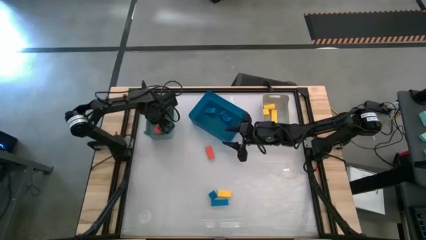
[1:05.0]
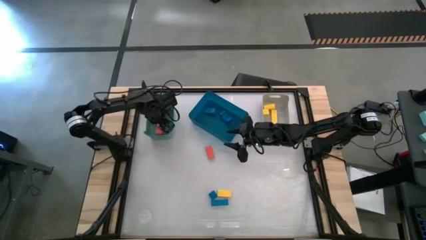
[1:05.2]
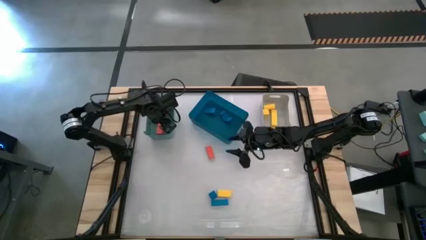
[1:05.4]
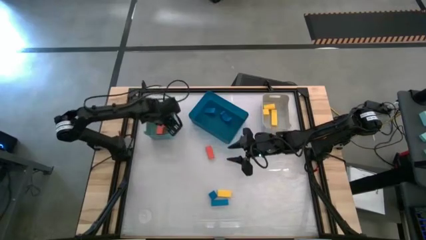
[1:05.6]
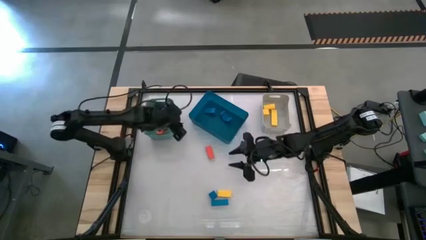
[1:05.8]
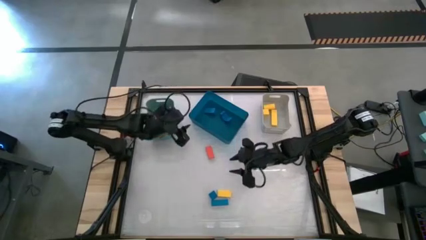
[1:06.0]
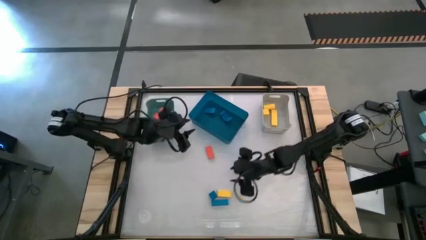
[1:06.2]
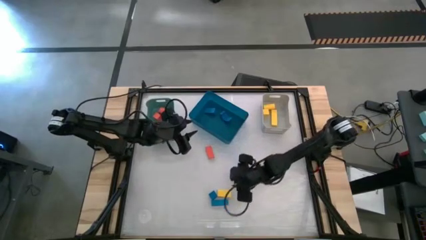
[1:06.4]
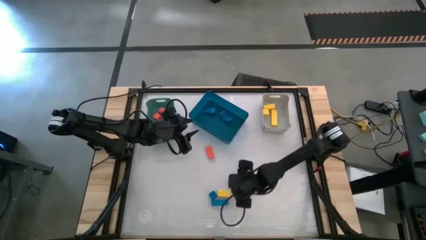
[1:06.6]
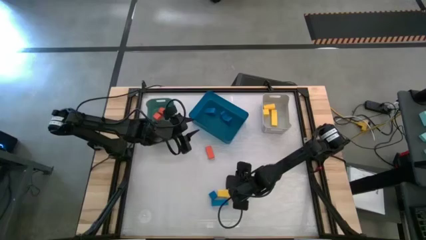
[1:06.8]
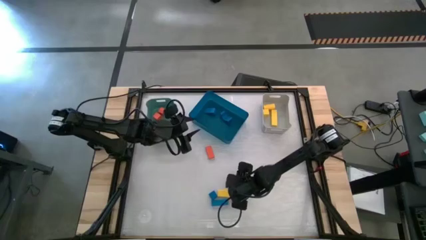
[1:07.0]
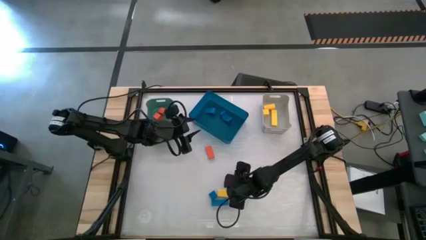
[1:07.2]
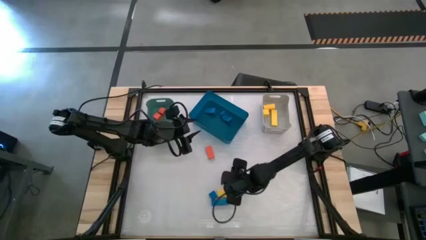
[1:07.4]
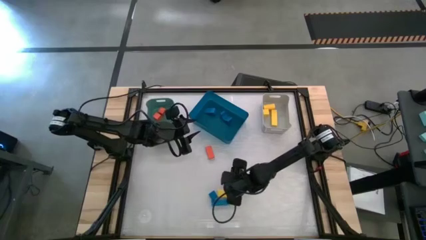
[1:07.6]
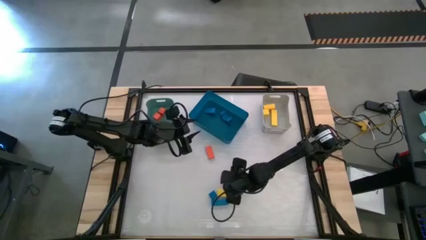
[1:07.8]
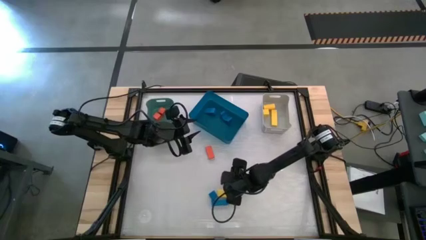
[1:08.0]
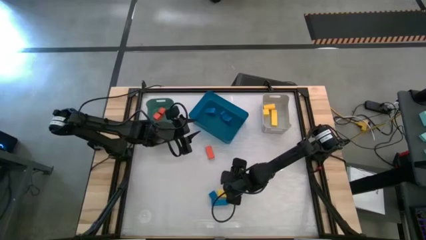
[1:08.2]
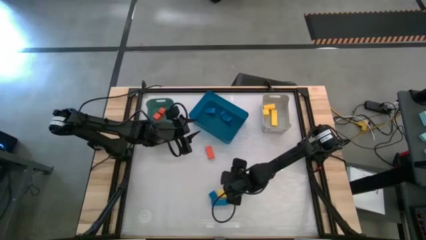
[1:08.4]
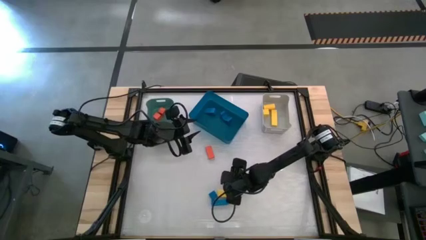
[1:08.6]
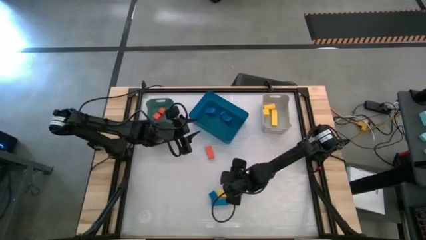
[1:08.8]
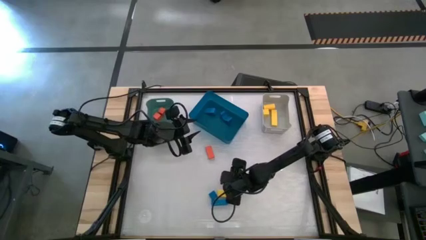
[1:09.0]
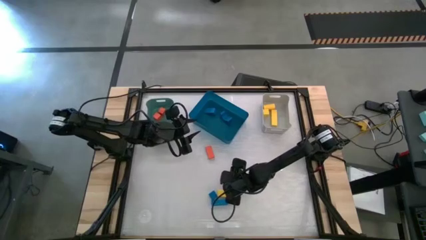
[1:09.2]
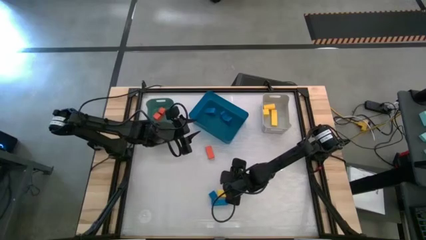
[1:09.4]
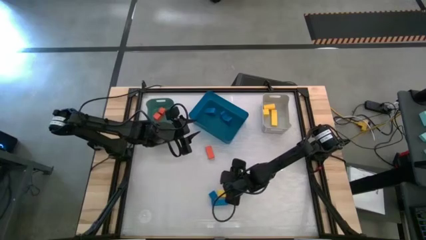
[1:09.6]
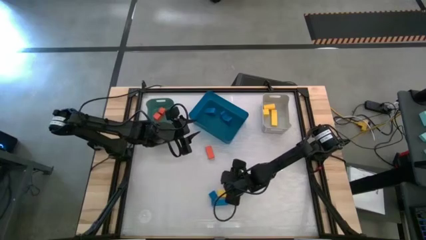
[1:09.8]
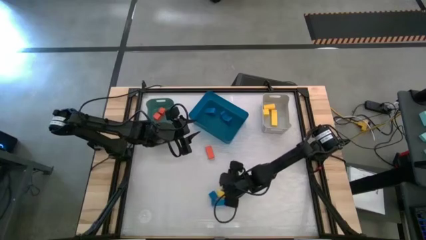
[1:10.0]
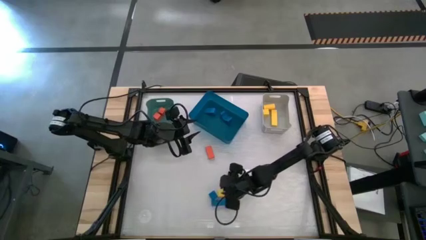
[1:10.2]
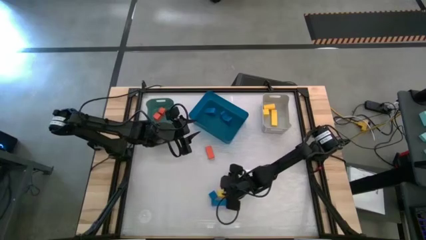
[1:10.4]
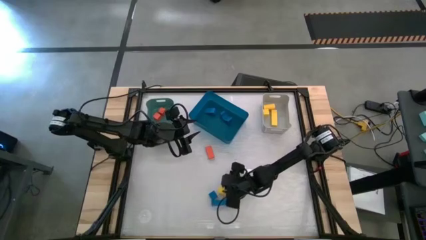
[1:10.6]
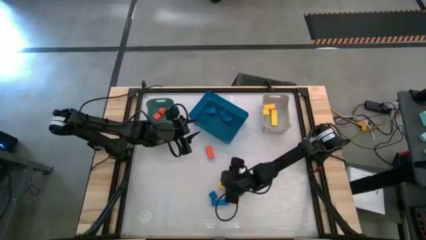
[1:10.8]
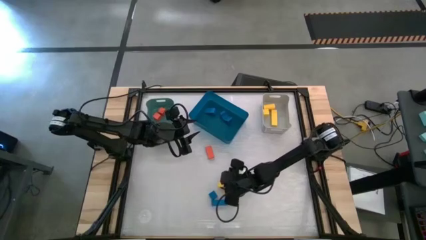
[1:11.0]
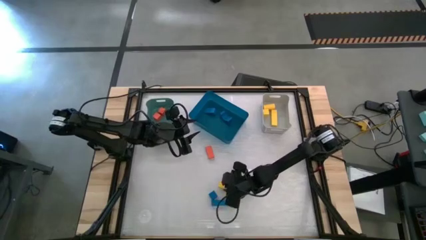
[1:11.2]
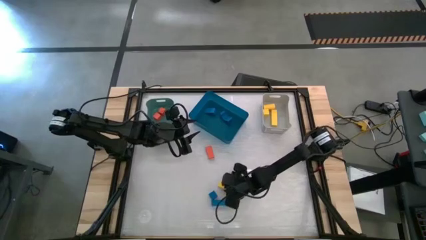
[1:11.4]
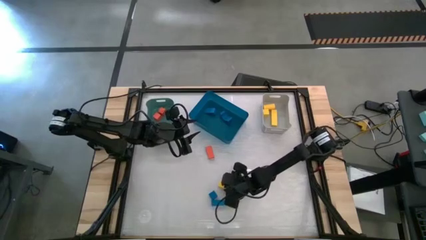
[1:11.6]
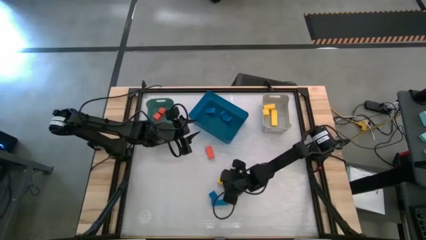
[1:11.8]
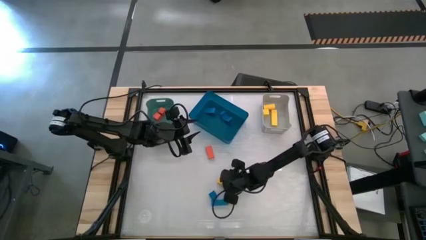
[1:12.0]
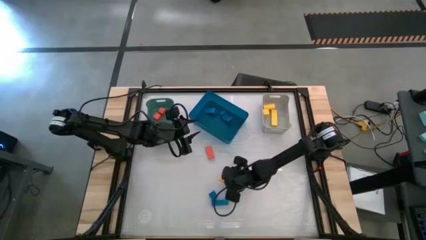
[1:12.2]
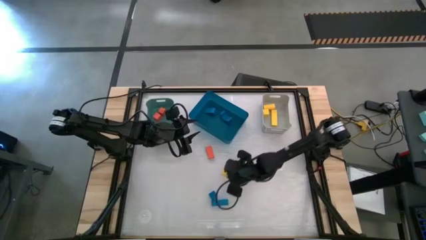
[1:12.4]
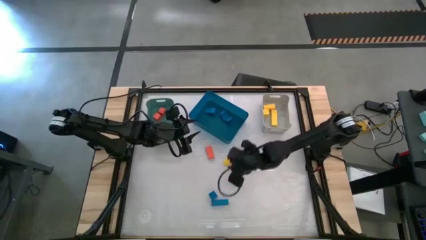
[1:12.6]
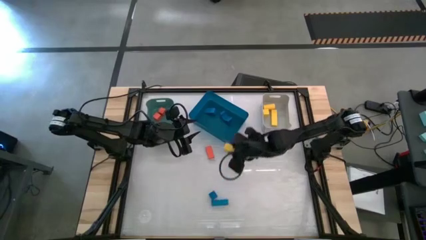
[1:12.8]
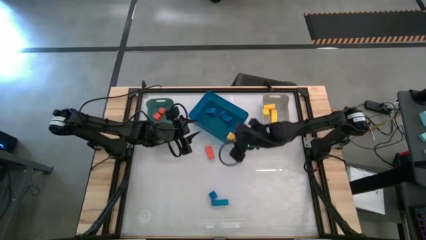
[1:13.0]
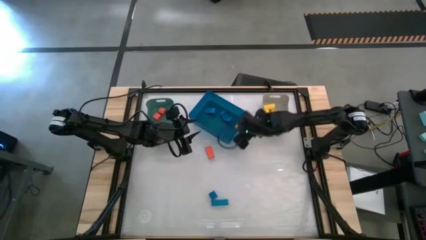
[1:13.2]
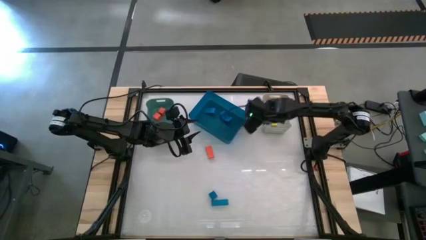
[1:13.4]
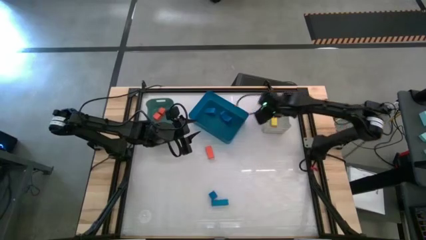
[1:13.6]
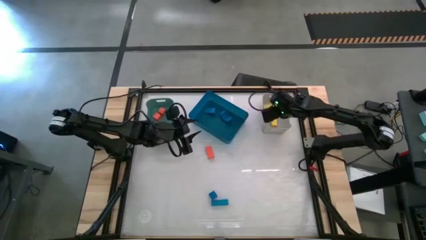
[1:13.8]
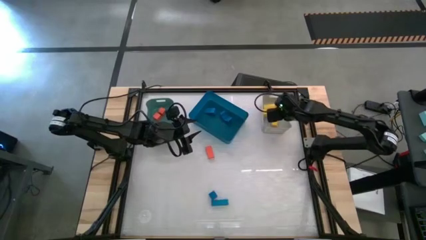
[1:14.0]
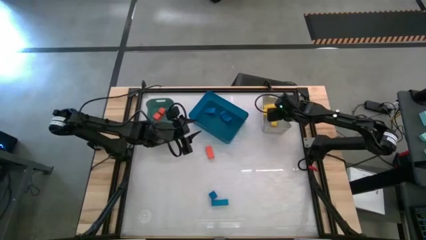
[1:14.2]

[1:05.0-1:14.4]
Task: Sort & place blocks by color
Put the yellow block into the gray bin

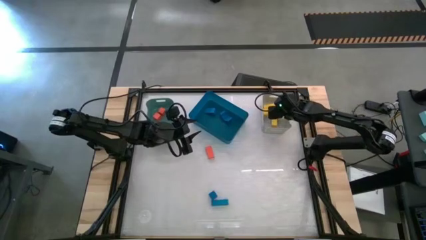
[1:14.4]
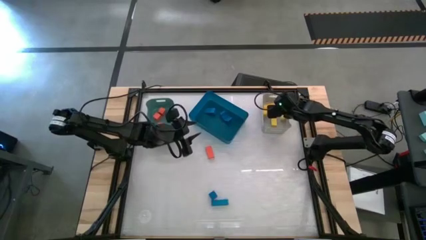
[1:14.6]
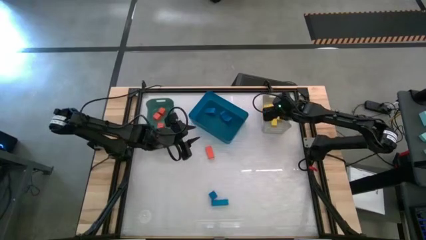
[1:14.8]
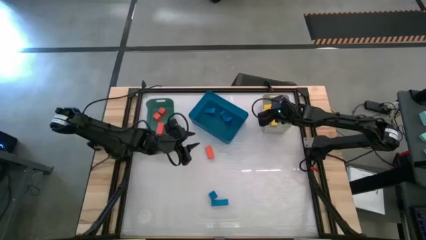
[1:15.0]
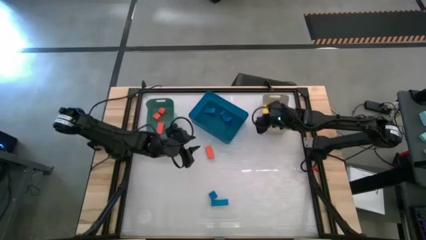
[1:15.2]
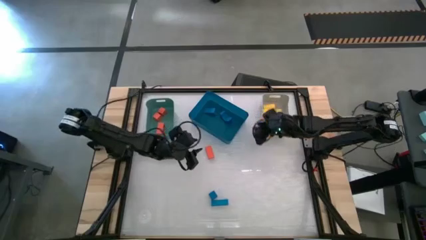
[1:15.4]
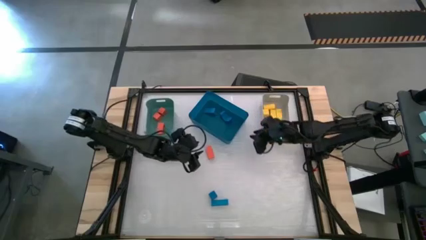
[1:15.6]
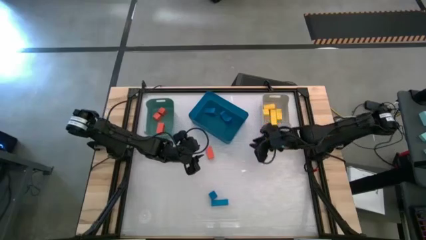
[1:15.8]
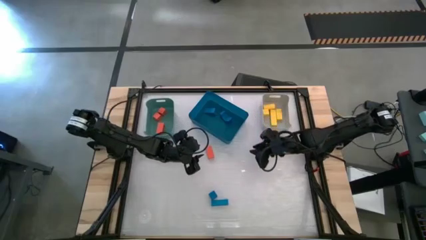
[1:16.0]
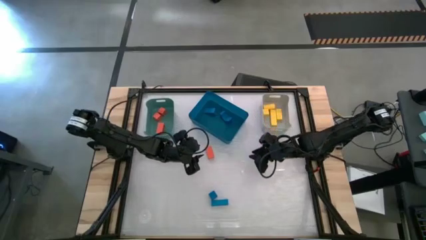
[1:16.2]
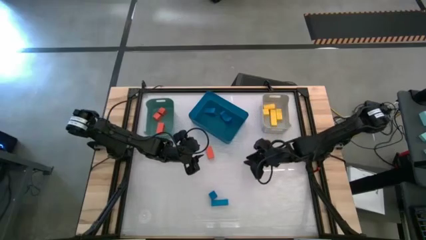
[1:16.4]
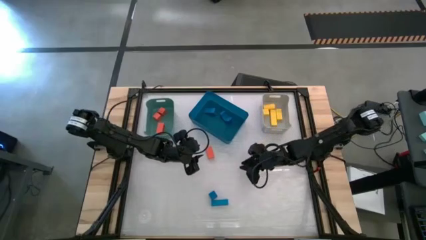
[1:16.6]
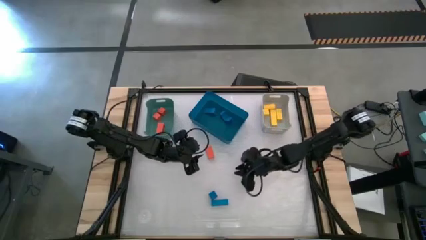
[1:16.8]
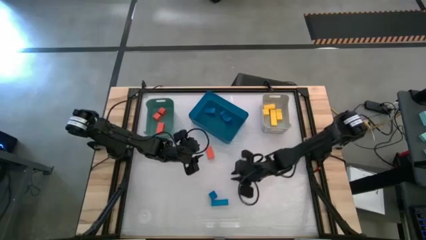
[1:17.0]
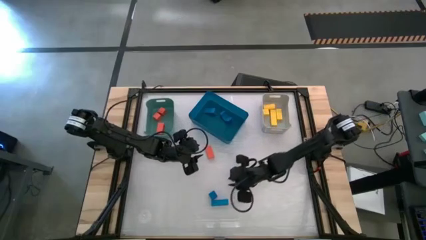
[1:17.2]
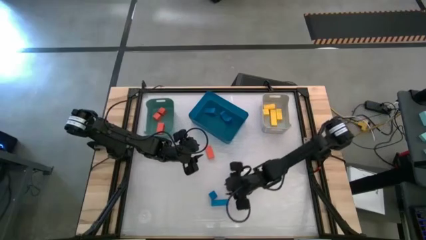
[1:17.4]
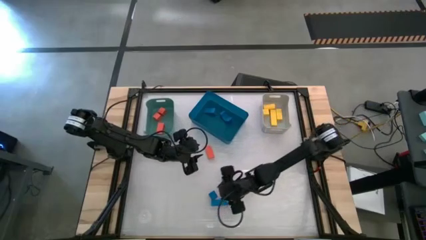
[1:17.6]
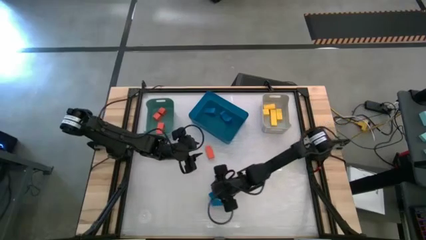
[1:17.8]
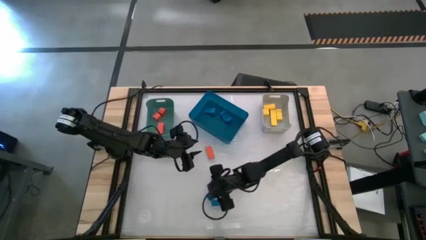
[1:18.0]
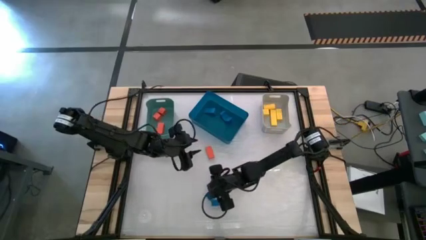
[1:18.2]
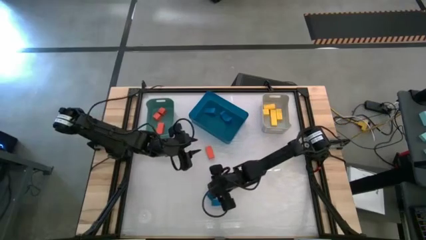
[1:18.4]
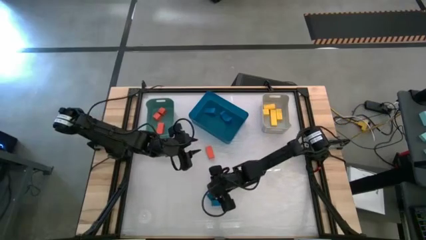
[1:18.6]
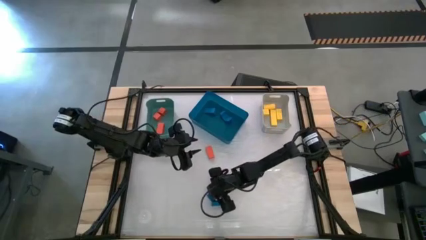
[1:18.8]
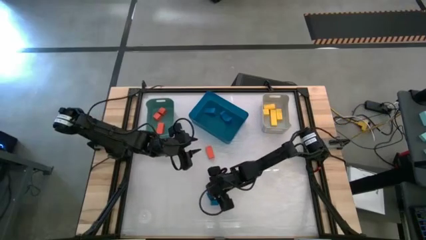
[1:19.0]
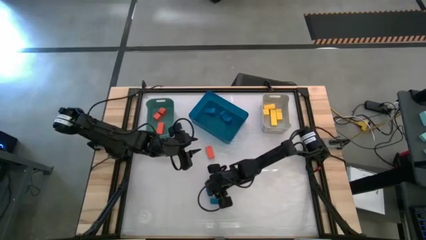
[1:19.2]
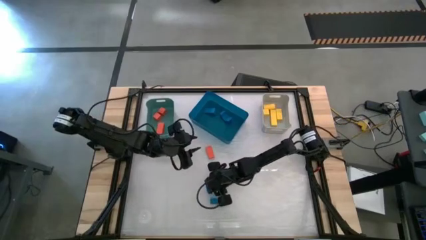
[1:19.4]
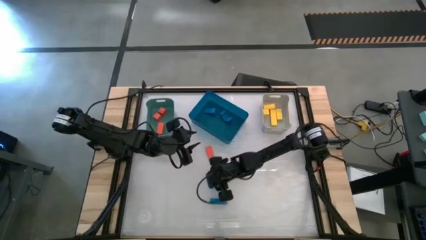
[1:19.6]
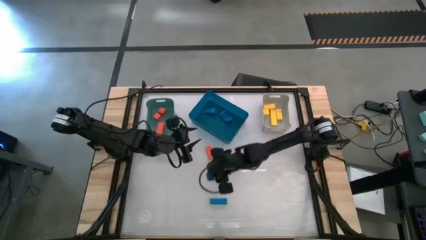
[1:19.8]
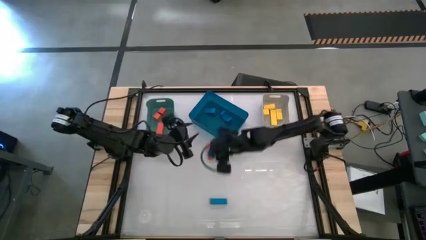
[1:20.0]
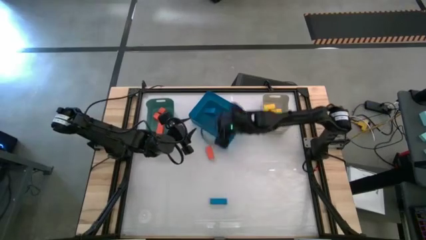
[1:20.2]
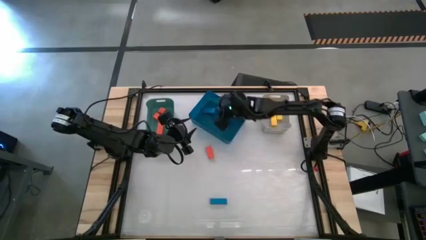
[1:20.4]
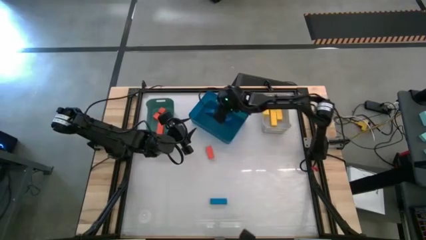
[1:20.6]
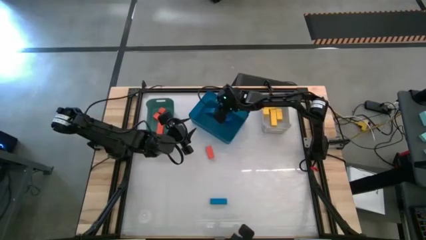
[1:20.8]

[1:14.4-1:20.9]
Put the blue block into the blue bin

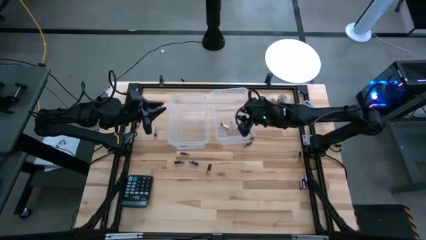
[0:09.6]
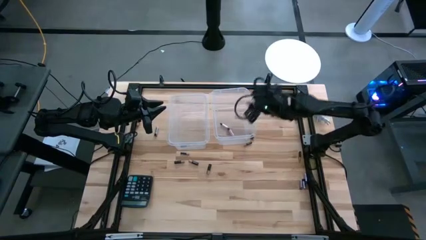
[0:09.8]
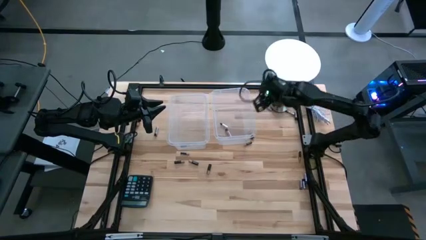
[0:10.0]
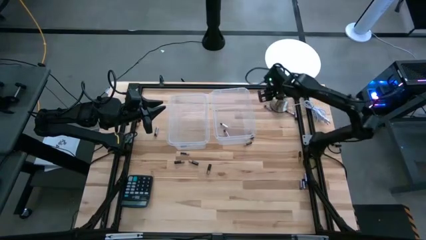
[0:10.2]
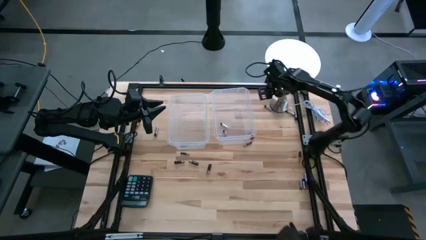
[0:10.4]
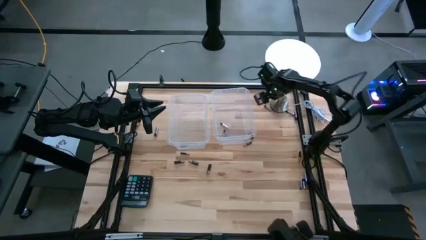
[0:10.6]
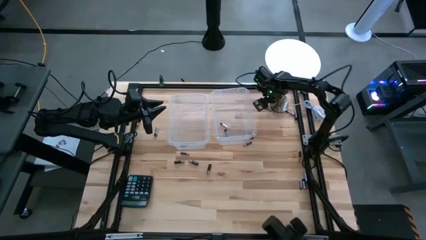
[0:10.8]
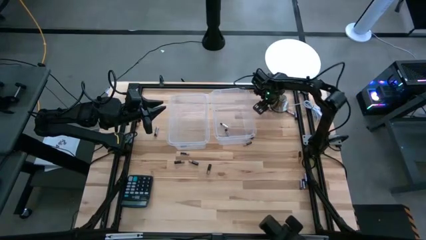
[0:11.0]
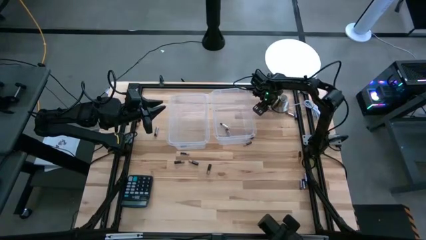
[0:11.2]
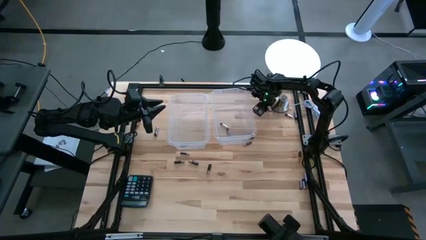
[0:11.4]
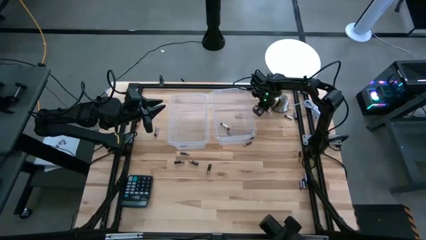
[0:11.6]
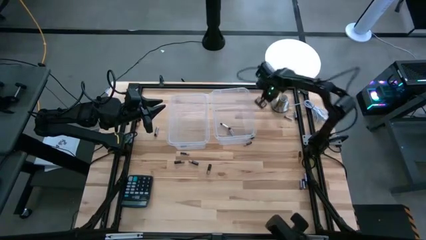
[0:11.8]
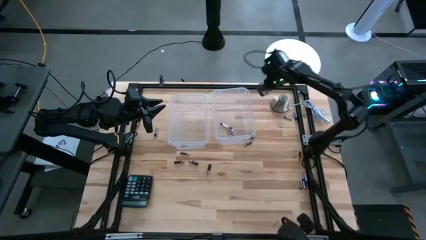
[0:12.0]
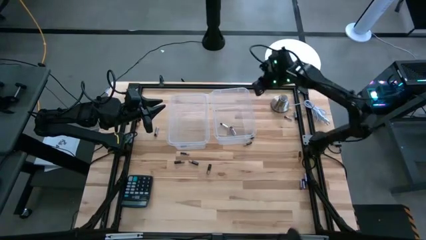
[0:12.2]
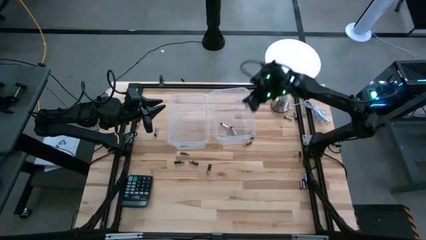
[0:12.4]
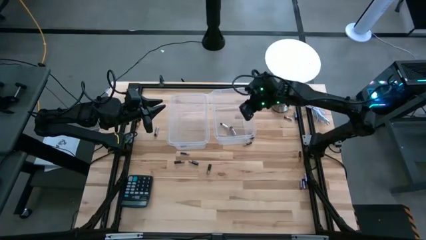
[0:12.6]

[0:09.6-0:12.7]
Task: Sort batteries
Put silver battery into the right transparent bin
